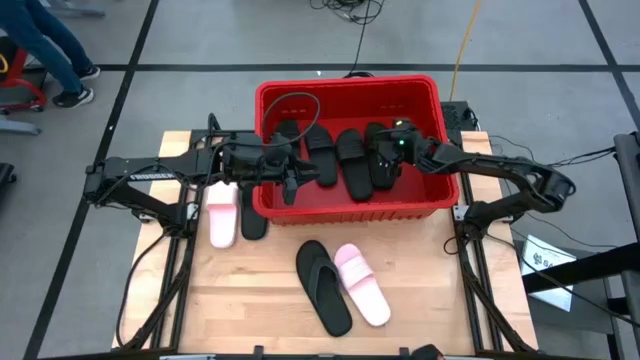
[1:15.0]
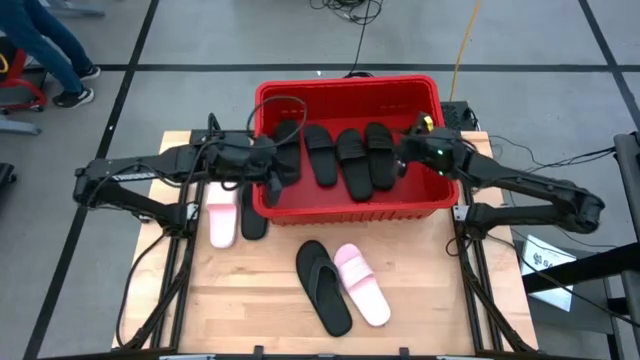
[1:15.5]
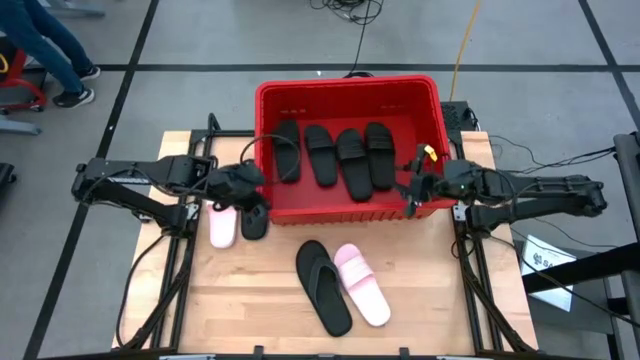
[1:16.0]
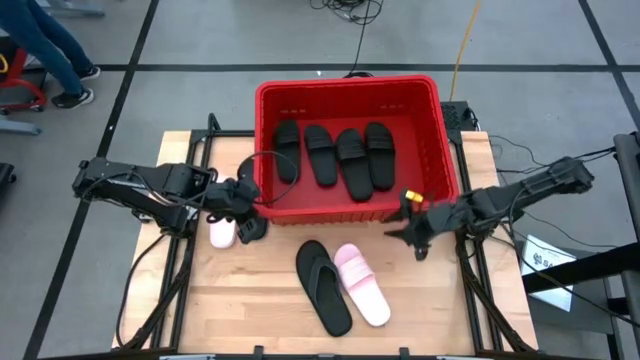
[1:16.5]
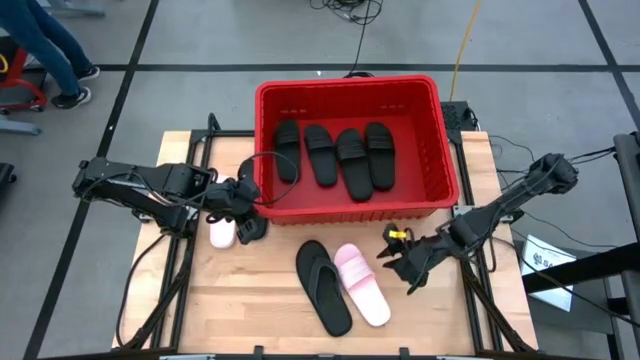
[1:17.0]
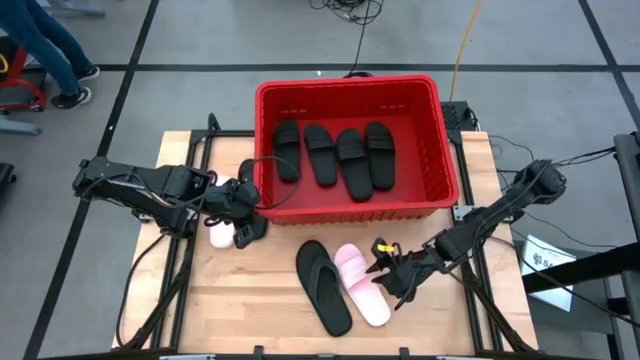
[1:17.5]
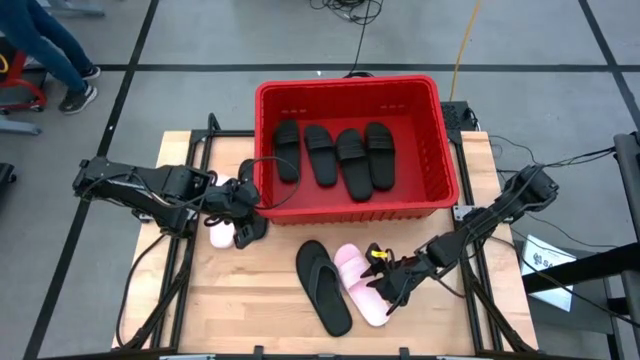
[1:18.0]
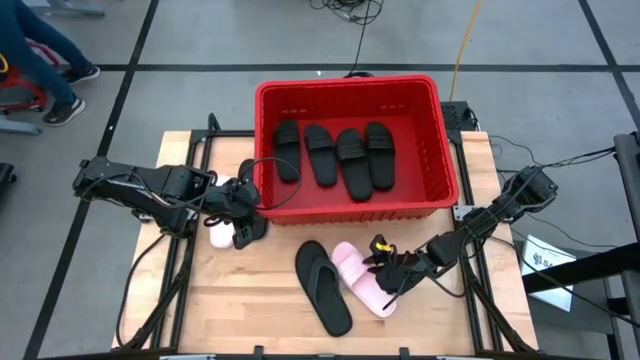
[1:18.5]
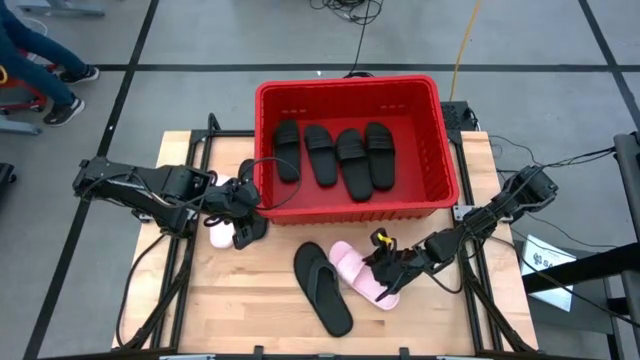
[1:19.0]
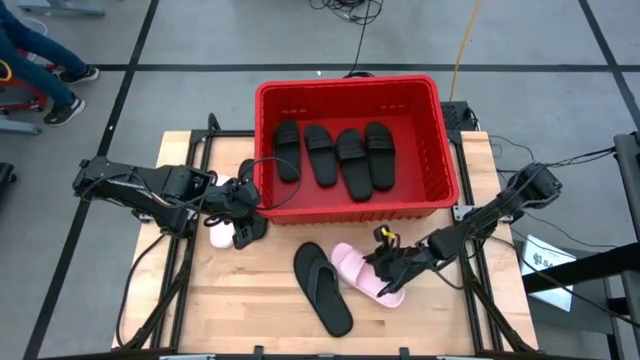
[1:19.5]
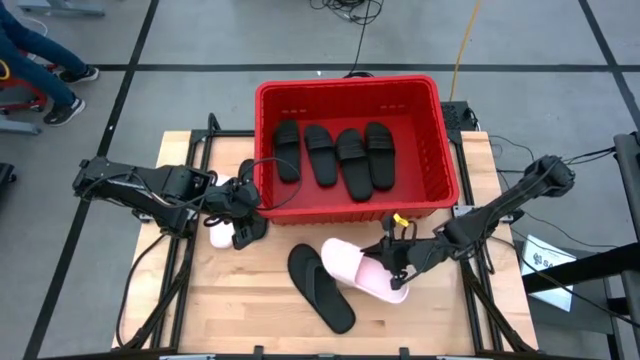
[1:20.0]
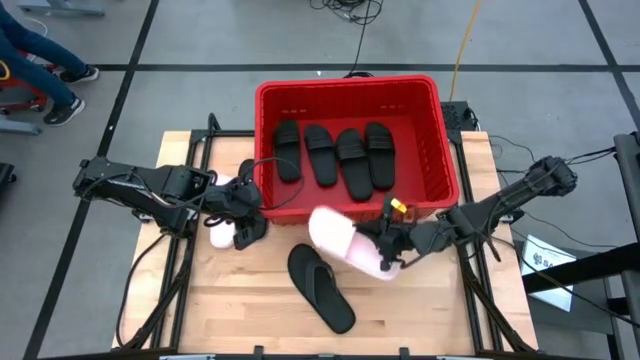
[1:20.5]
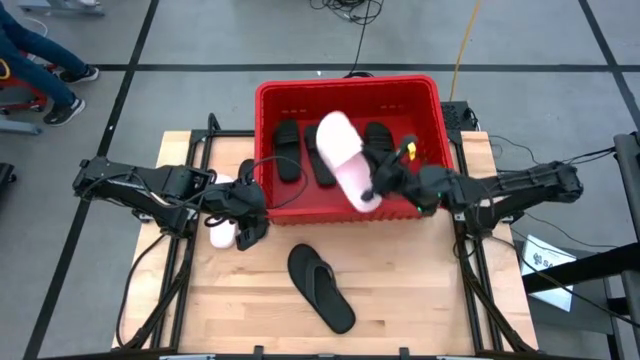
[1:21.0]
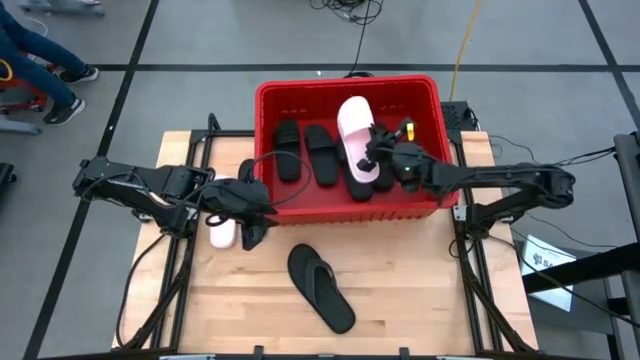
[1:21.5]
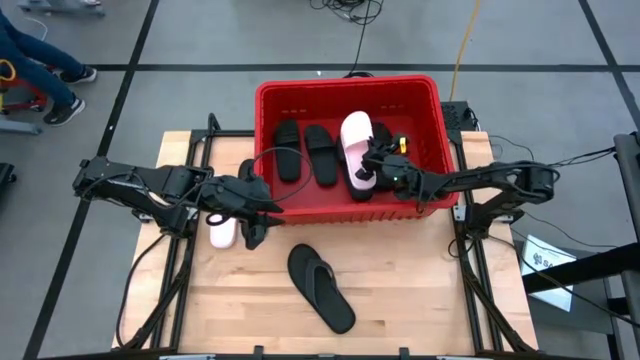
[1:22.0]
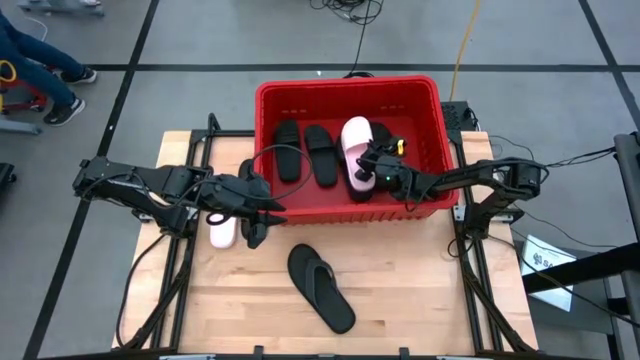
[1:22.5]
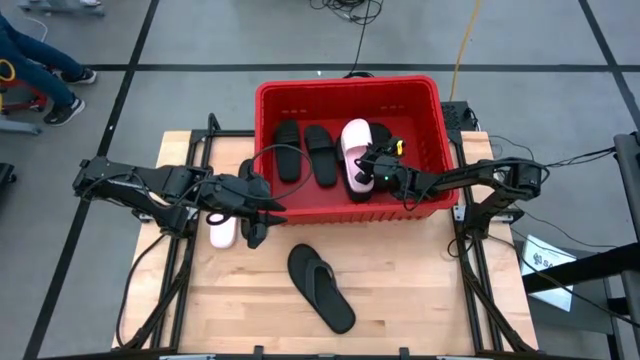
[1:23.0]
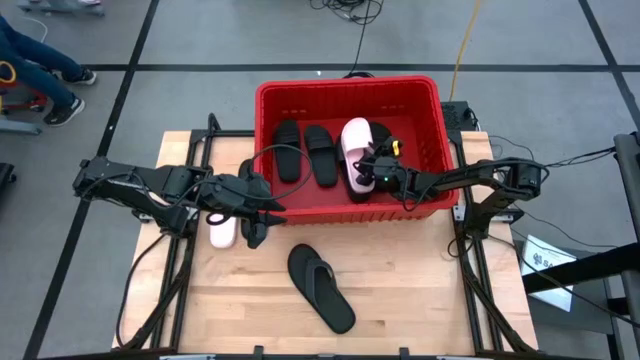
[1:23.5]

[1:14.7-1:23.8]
Task: Pick and place slides into bin
Stack the right pink slide on top of the black slide in the red bin

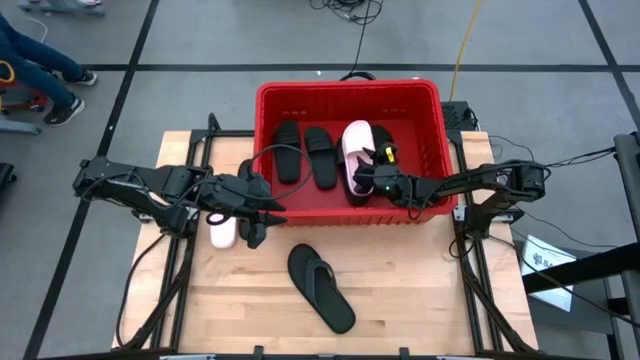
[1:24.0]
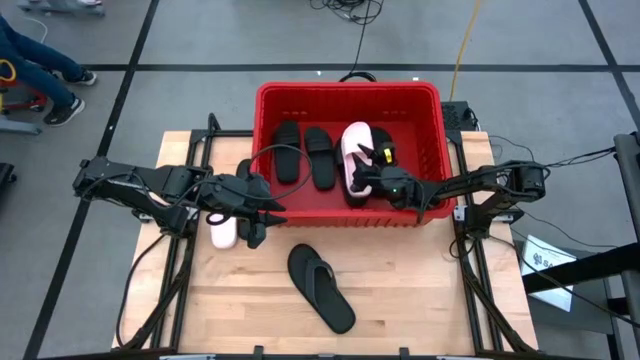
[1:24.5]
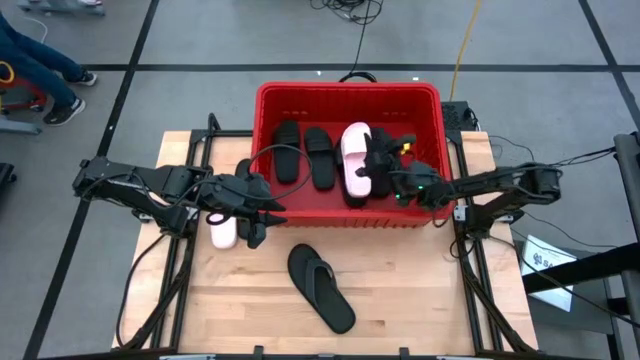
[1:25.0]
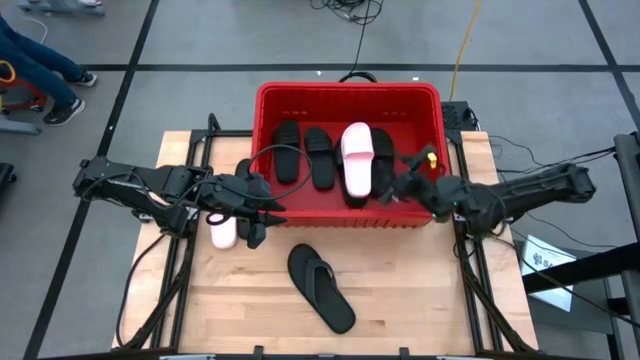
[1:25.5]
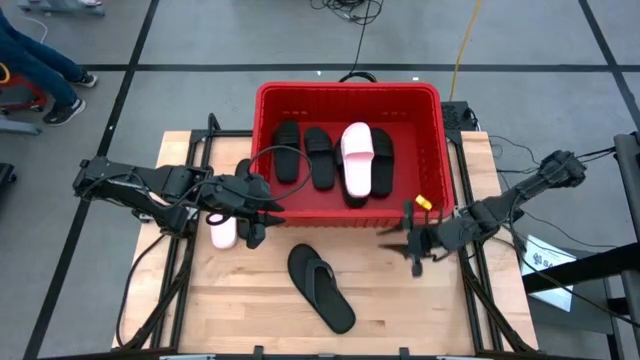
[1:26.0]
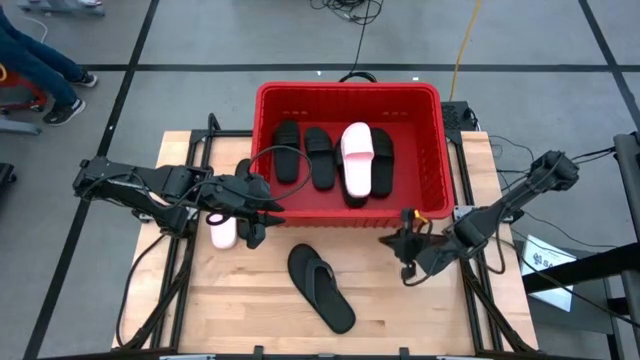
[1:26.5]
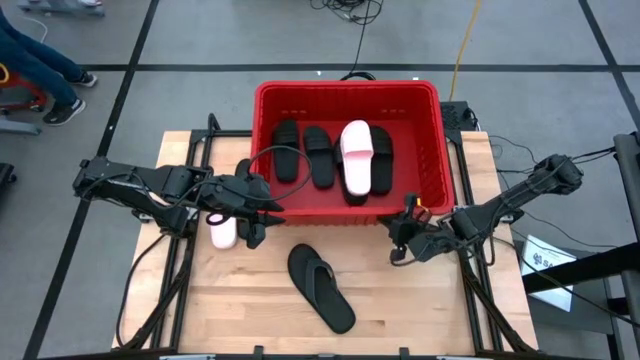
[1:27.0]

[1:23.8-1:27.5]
Adjust the red bin
